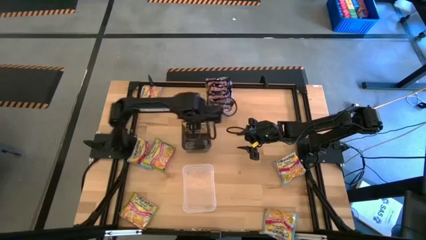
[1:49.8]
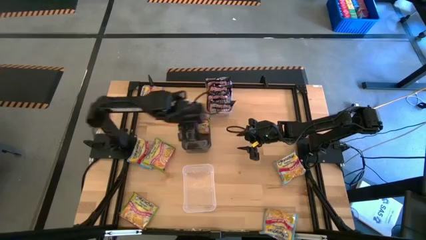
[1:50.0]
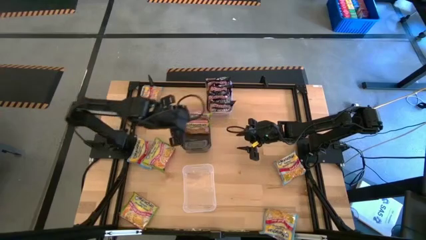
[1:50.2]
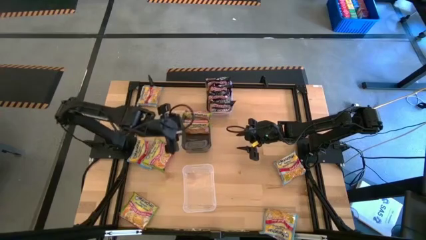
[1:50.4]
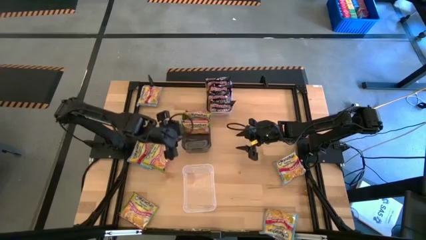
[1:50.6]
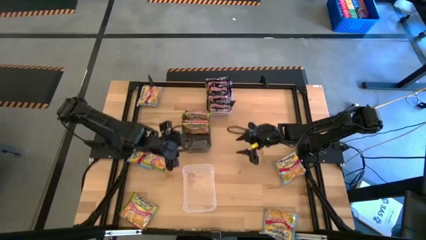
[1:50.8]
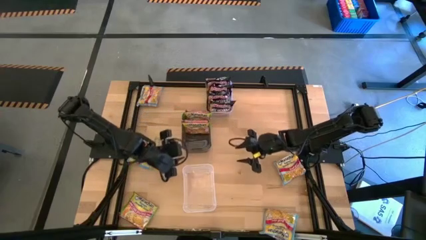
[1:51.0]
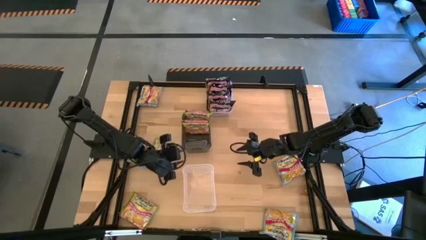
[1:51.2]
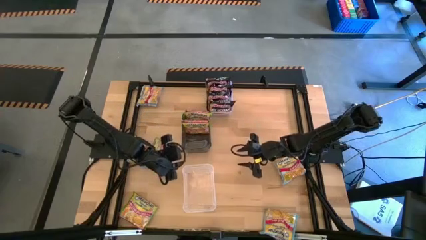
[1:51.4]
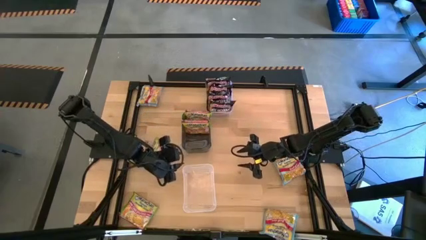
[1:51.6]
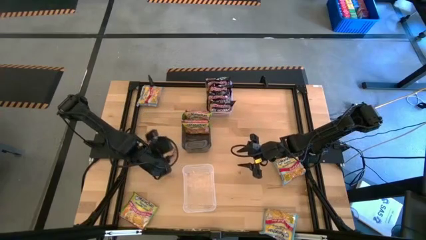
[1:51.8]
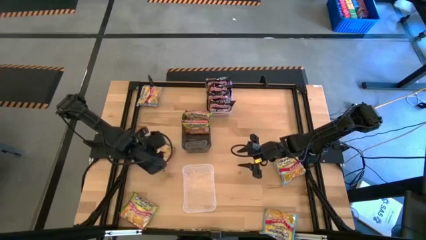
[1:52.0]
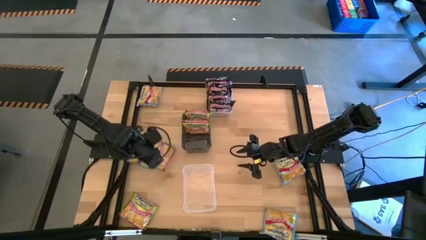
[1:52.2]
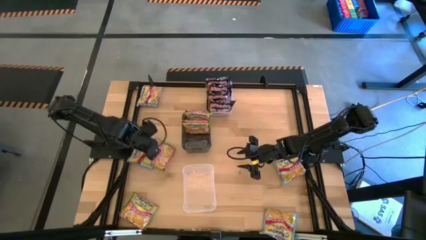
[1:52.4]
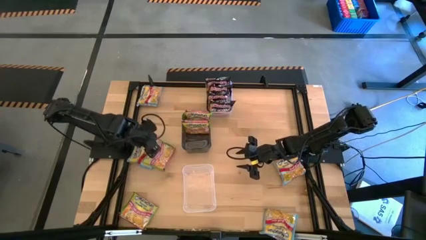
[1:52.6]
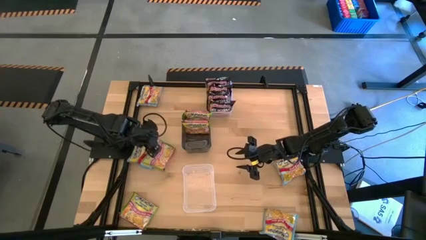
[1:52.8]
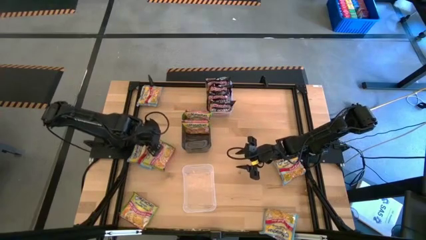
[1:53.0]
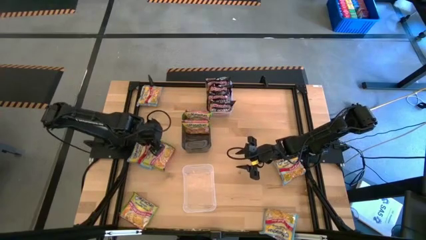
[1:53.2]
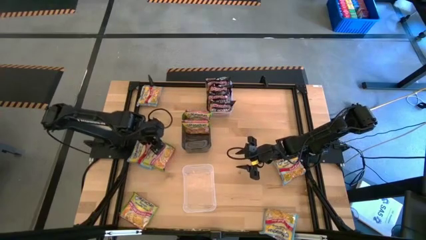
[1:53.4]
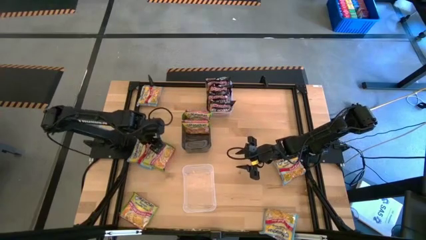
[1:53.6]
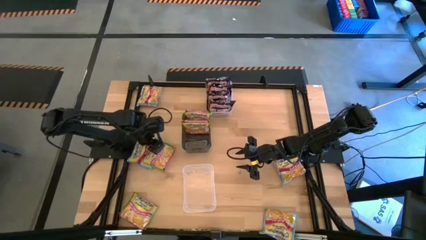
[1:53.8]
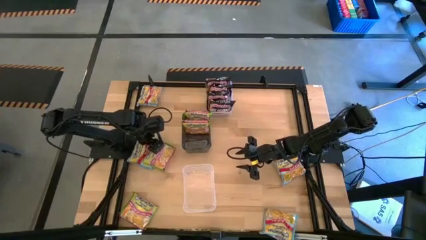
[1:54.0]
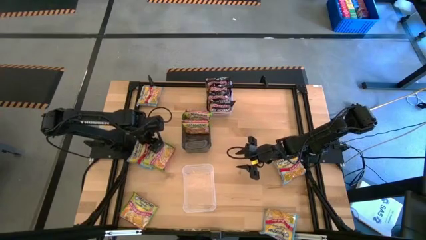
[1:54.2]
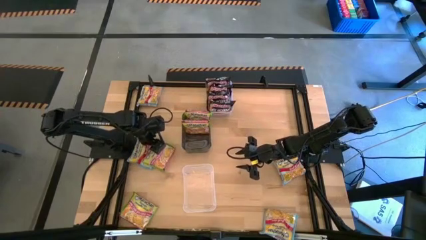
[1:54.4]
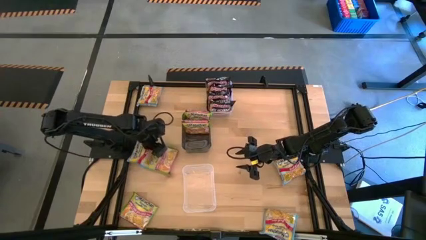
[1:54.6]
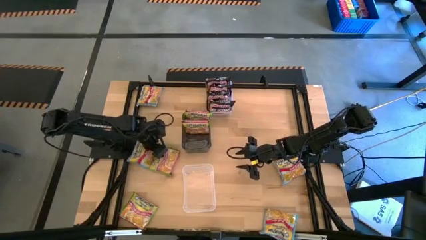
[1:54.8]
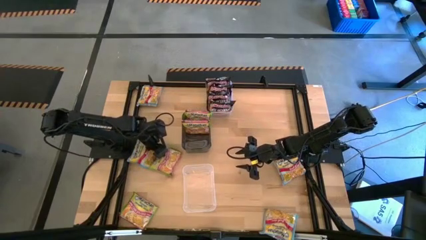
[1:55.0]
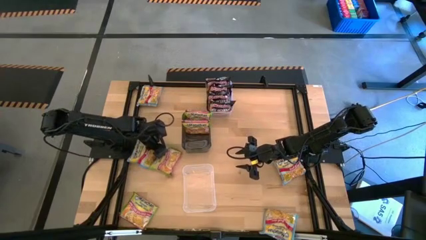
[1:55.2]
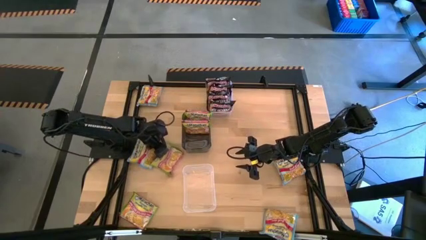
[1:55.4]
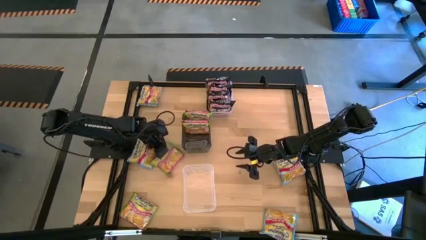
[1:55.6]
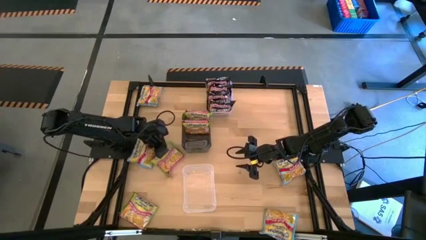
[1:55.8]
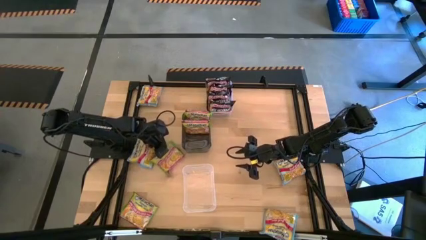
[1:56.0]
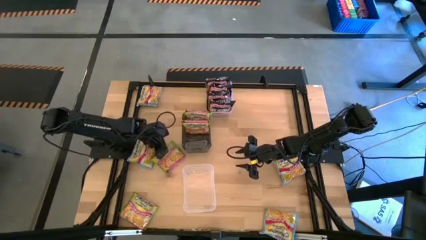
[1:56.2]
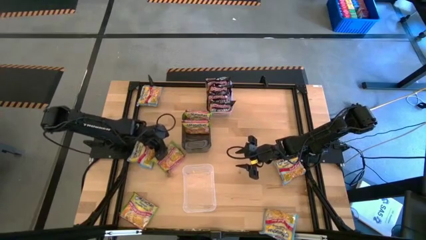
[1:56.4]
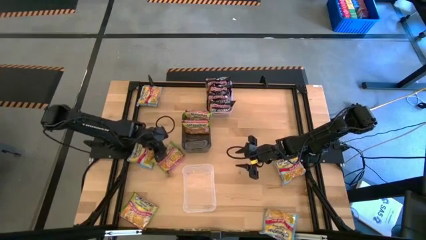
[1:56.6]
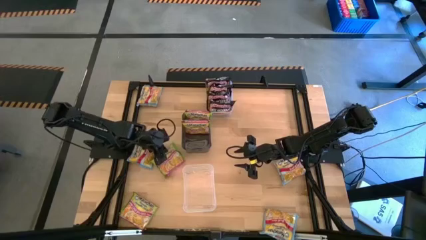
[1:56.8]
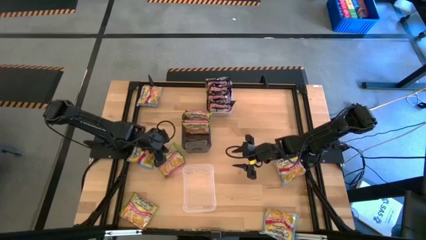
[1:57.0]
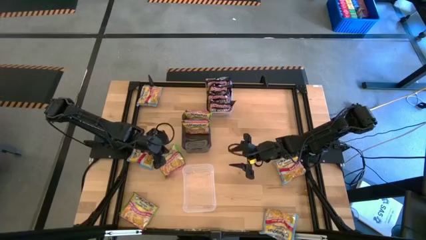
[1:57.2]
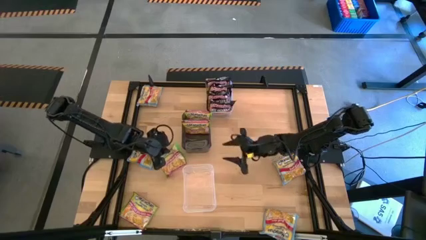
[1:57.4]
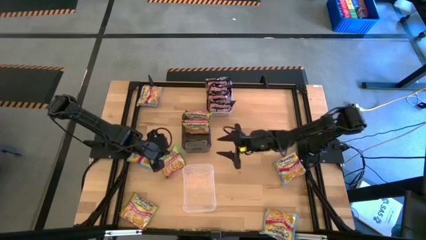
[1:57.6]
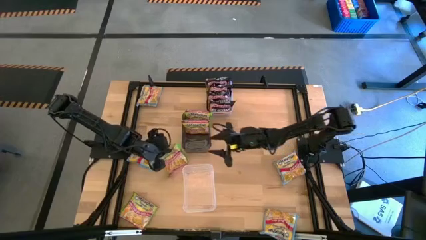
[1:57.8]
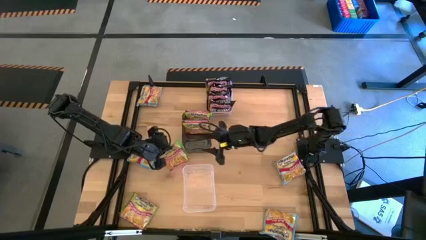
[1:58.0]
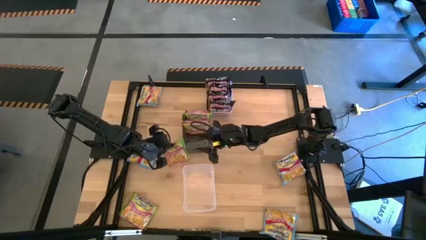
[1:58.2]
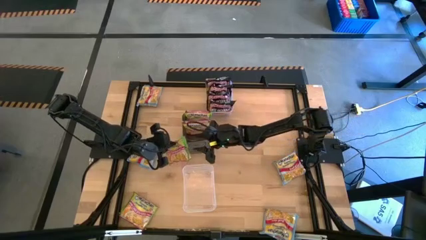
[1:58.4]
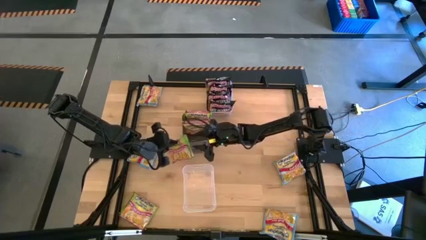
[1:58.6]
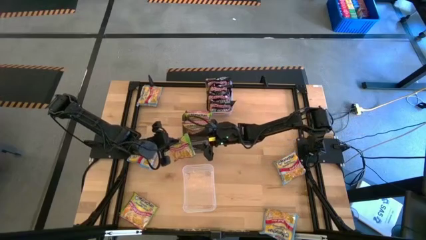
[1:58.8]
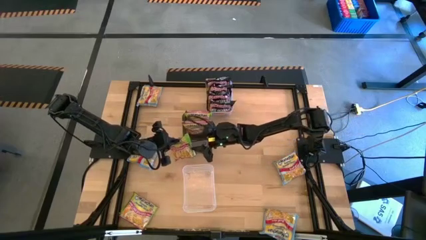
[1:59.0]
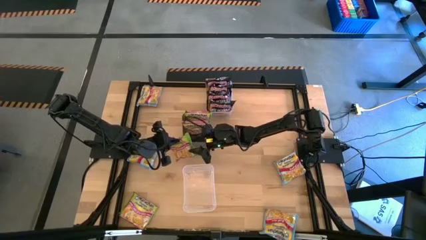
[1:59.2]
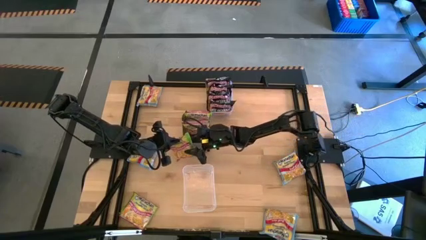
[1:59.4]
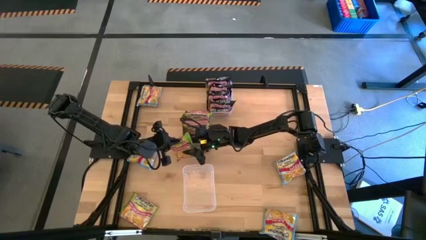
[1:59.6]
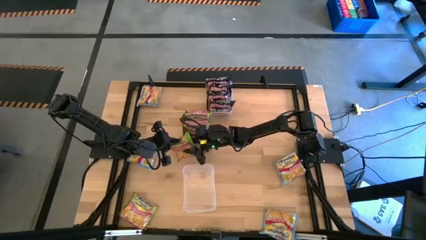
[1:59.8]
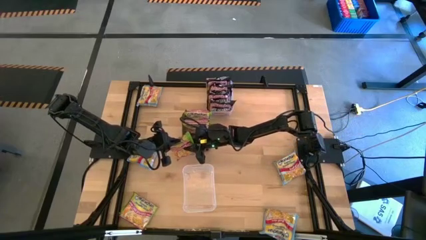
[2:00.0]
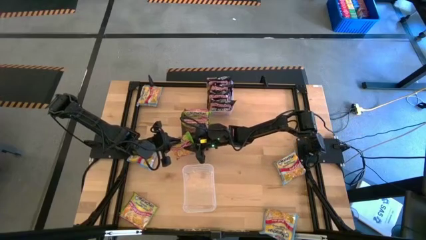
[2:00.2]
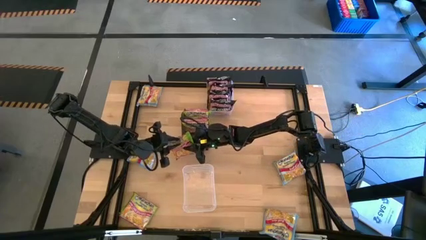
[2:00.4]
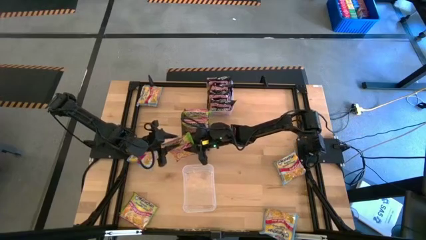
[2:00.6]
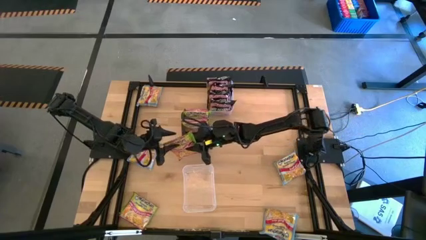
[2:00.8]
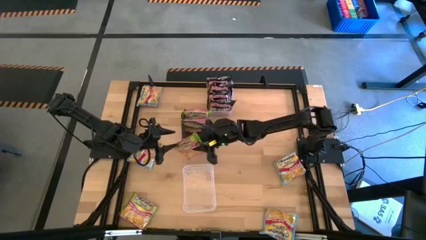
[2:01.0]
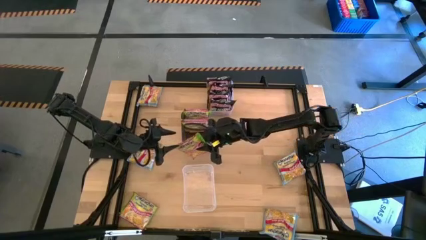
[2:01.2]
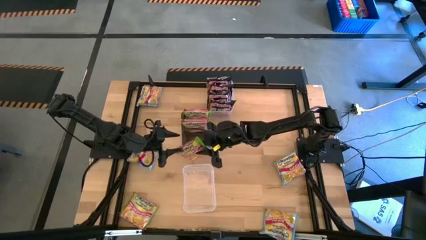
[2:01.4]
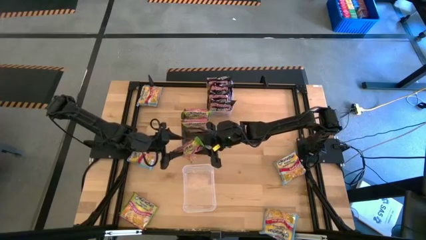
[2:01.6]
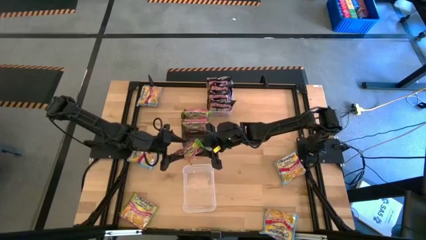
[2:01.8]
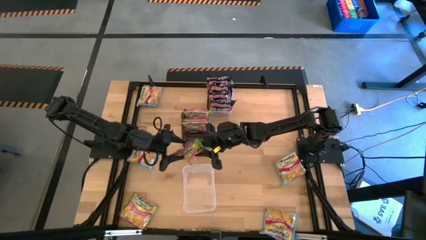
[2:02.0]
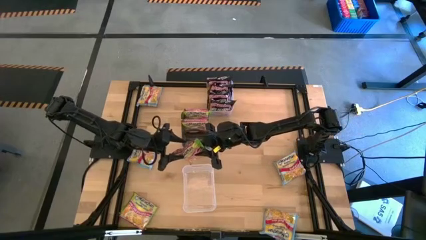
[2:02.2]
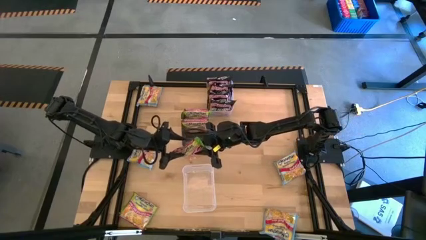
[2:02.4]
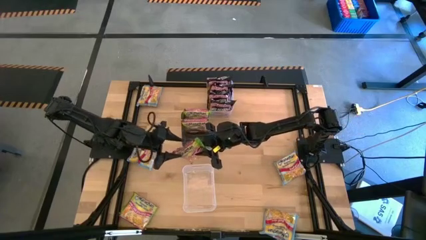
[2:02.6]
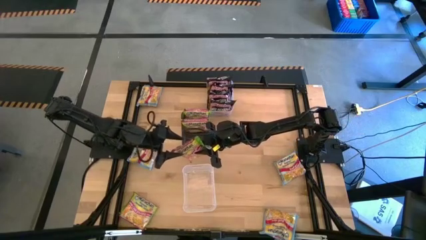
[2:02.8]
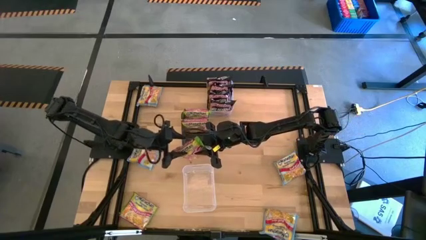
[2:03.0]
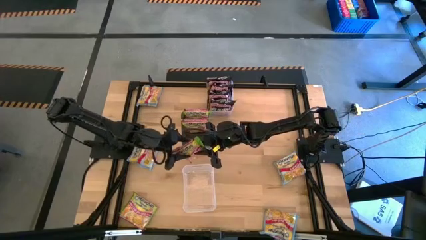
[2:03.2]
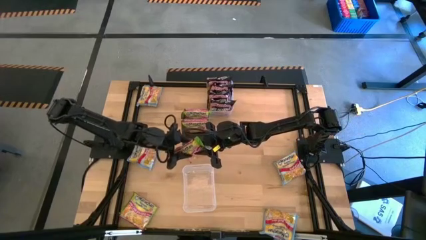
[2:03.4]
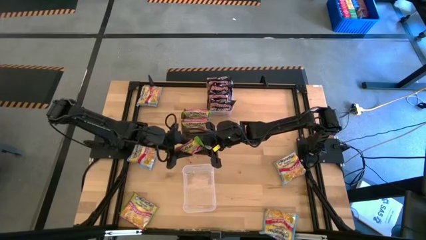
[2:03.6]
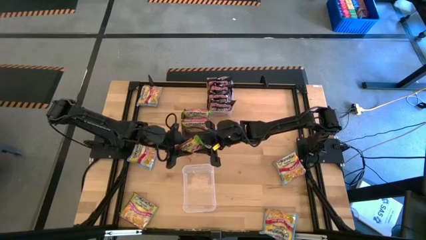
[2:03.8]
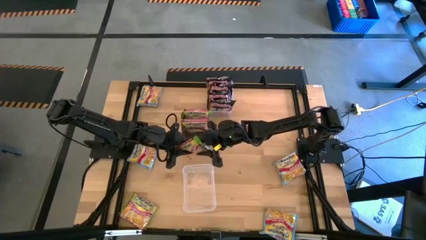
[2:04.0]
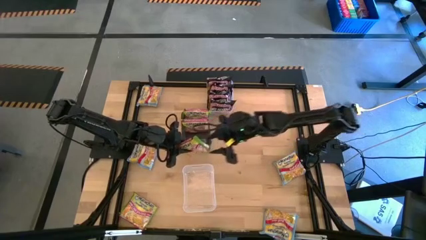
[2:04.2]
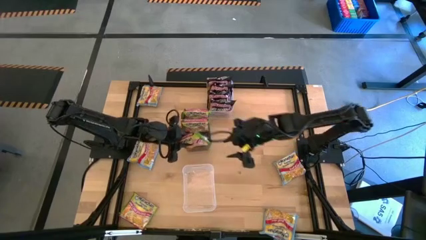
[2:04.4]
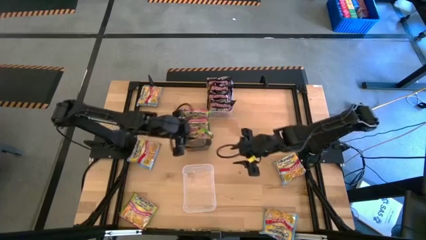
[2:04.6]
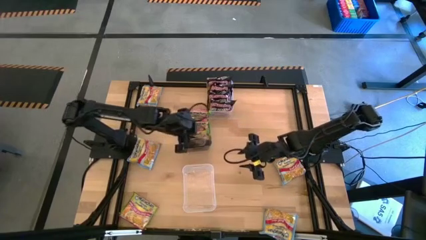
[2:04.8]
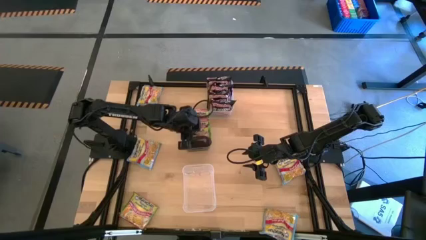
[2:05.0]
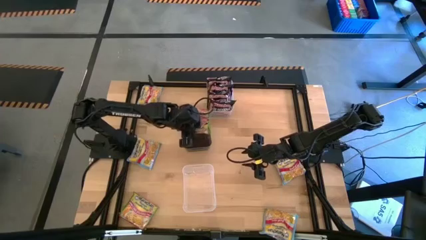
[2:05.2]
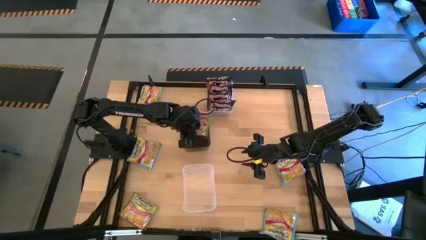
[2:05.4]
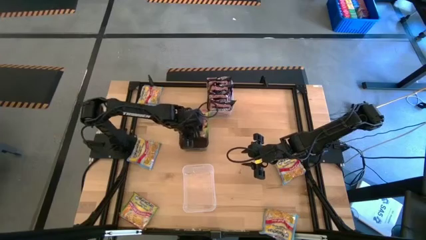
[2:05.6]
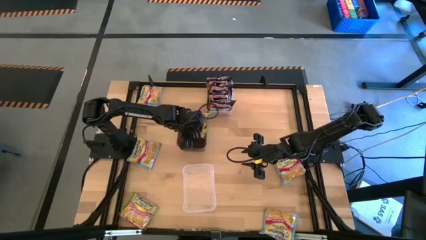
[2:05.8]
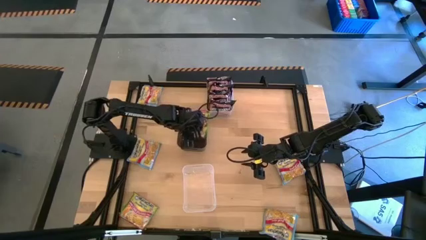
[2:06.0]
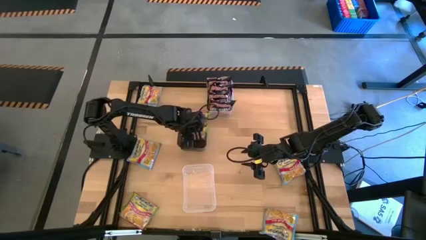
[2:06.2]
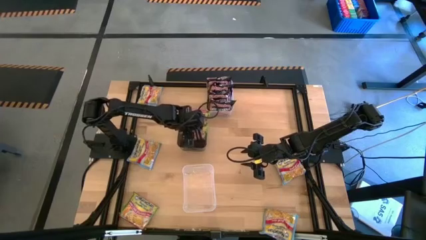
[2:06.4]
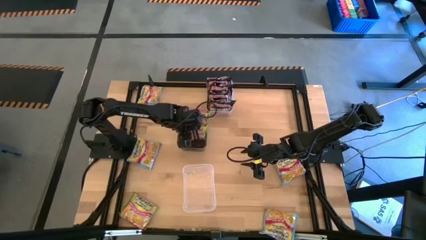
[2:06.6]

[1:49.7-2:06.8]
Task: Sort Maruchan noodles
Put the top green noodle pack into the black bin
